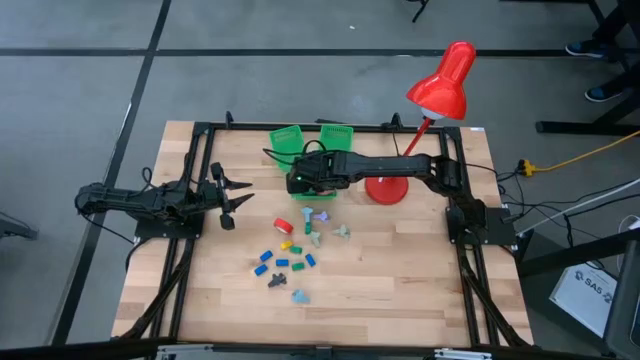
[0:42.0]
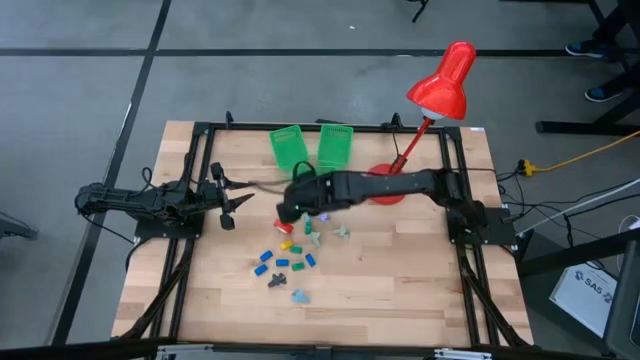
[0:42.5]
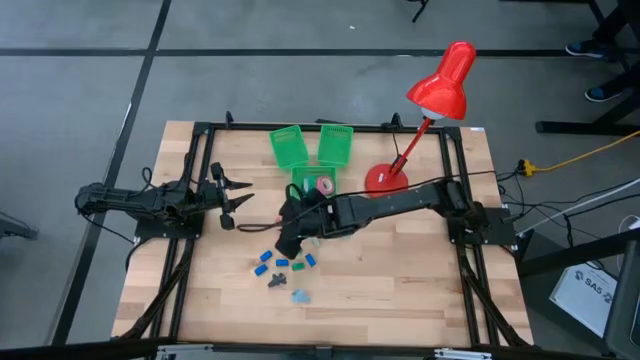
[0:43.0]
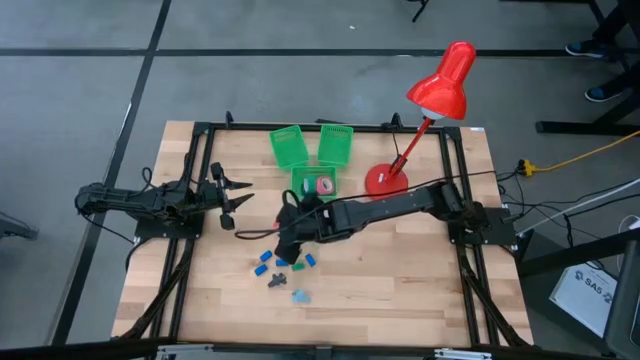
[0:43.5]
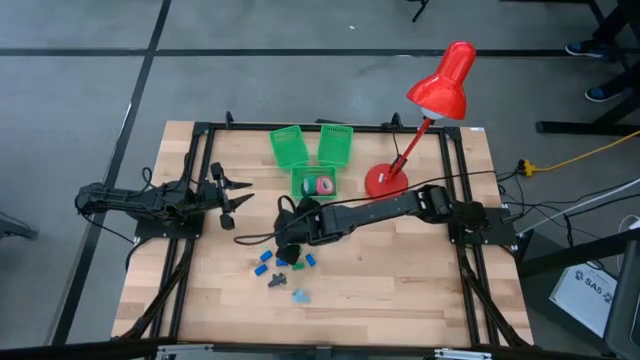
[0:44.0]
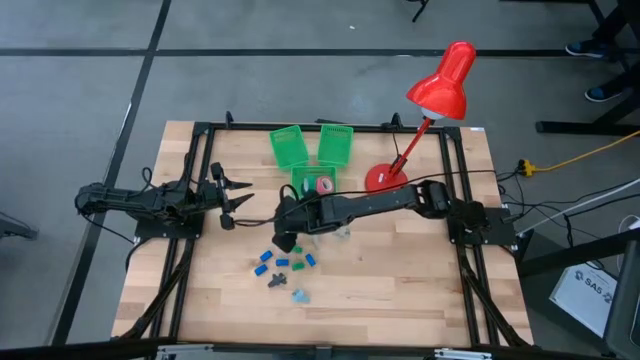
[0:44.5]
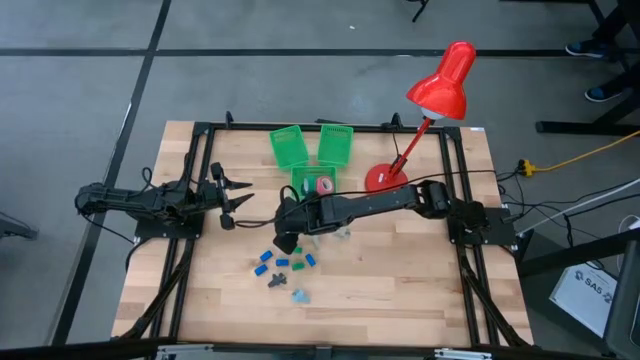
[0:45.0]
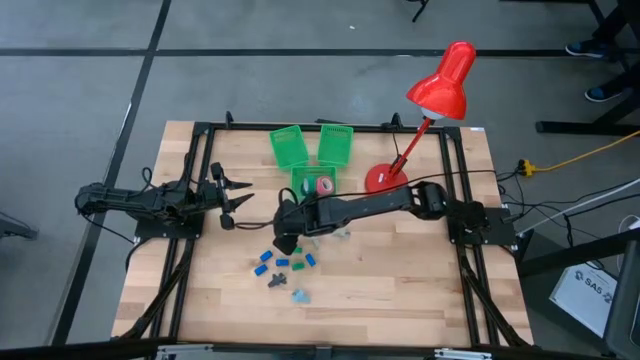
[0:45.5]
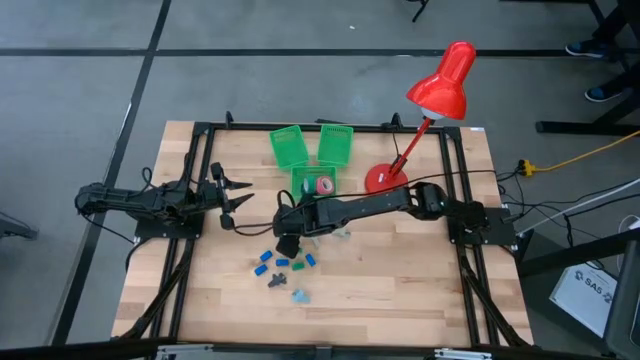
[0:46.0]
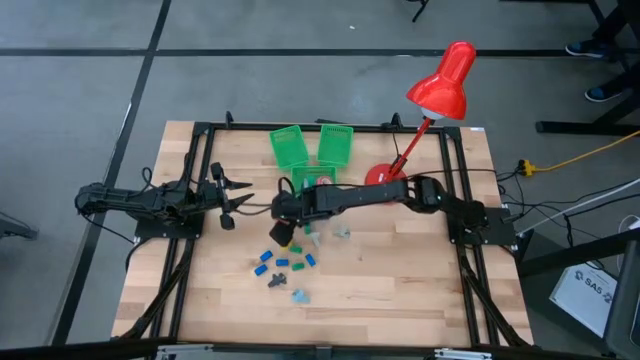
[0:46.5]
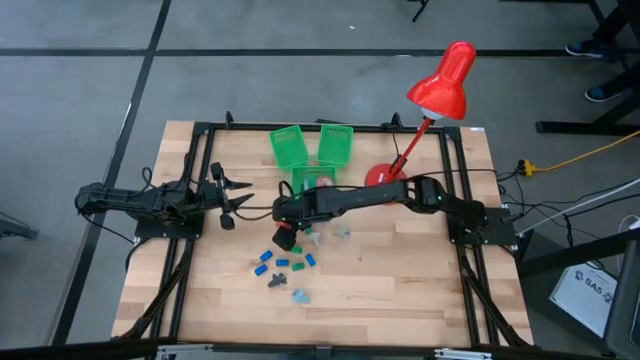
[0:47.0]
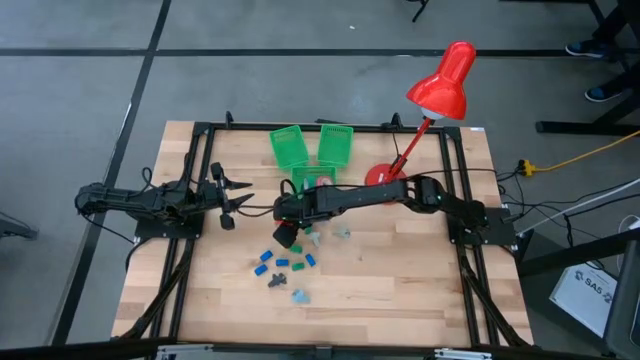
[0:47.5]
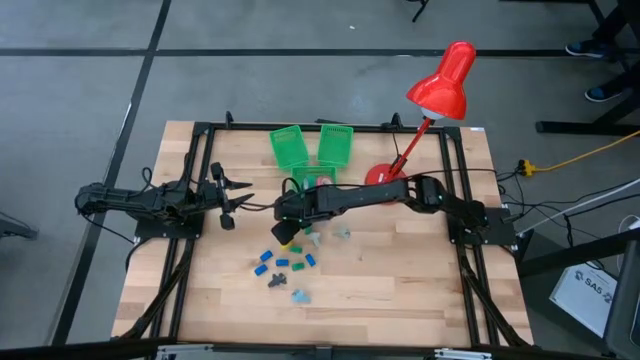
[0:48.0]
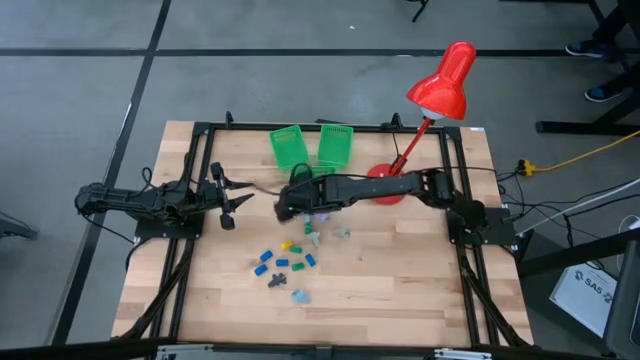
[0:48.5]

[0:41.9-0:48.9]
Task: Pick and place Stapler, Stapler remover, tape
Put the red tape into the middle green bin

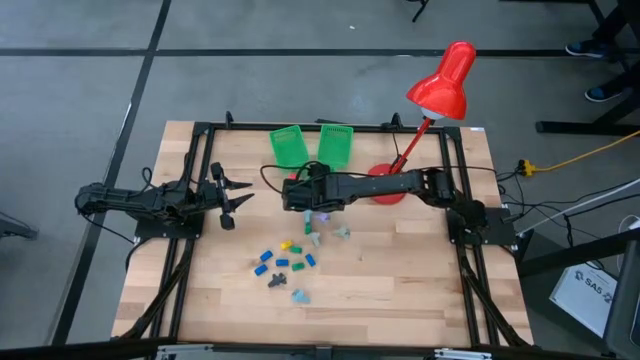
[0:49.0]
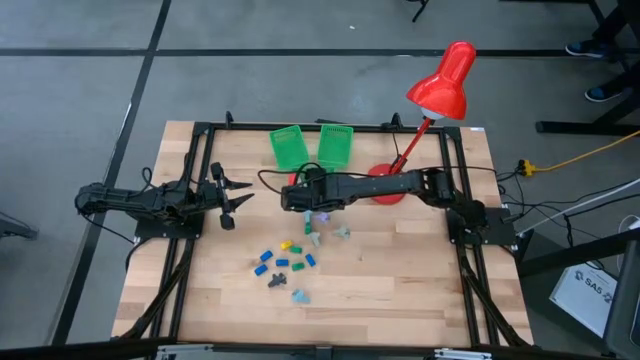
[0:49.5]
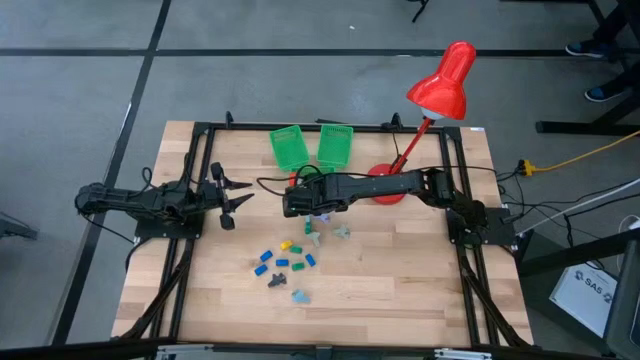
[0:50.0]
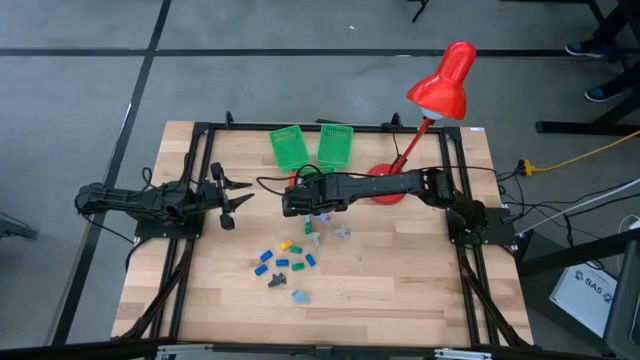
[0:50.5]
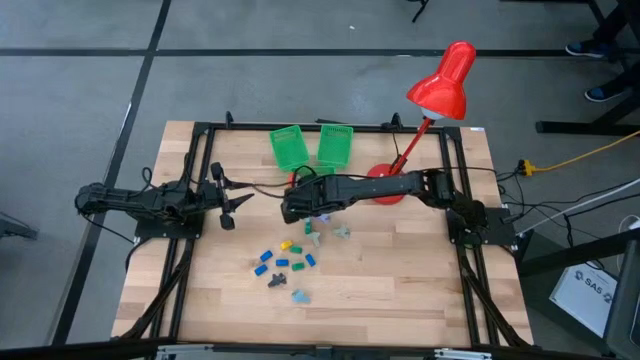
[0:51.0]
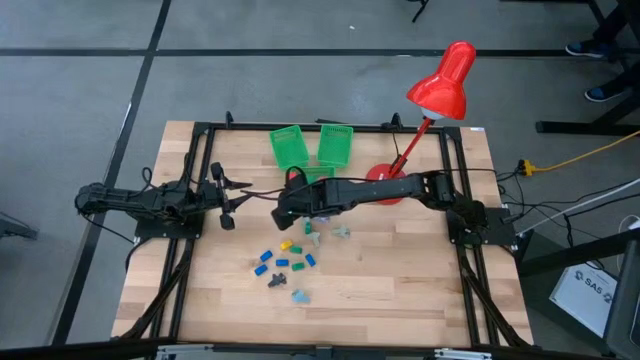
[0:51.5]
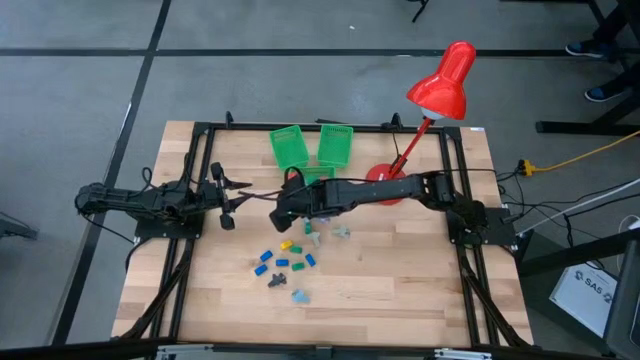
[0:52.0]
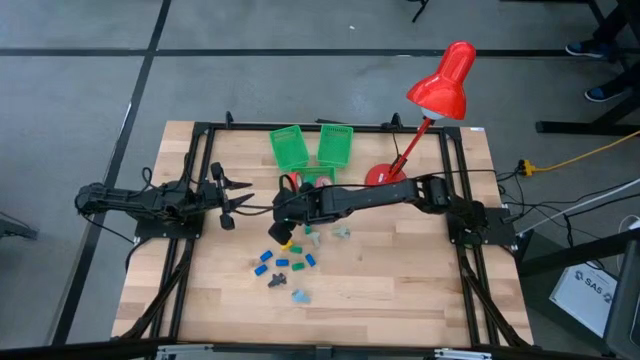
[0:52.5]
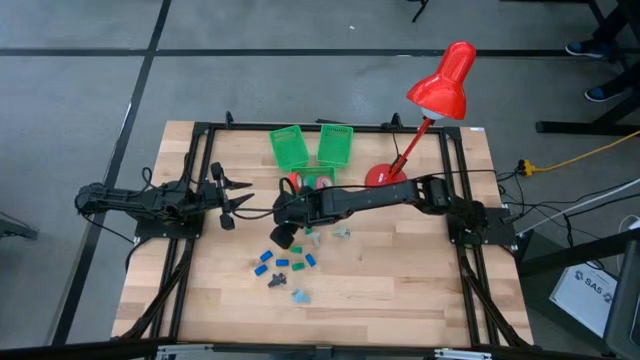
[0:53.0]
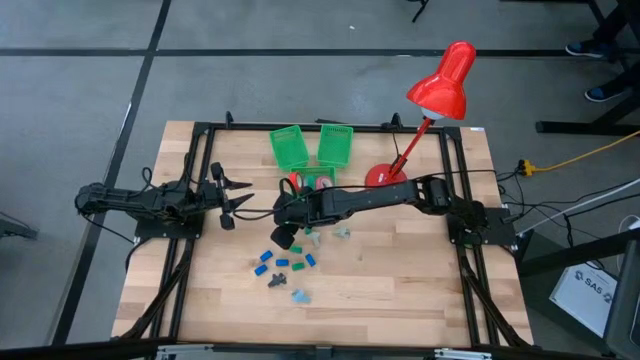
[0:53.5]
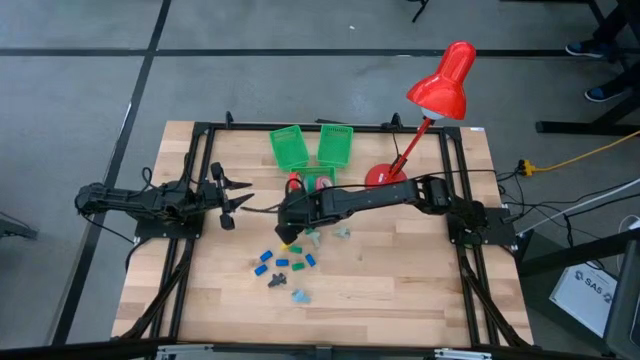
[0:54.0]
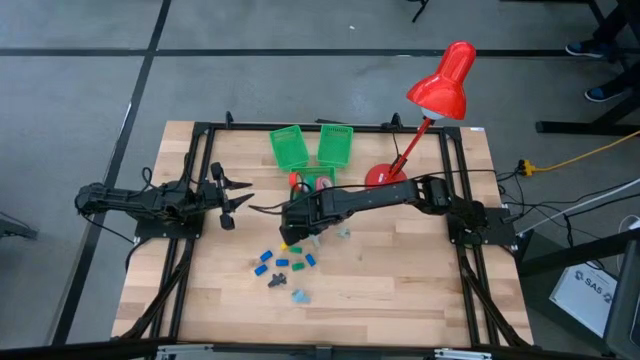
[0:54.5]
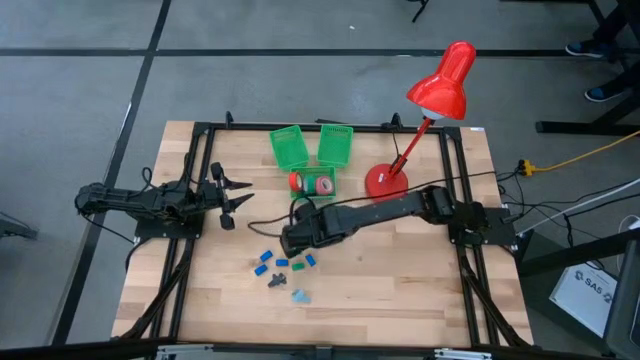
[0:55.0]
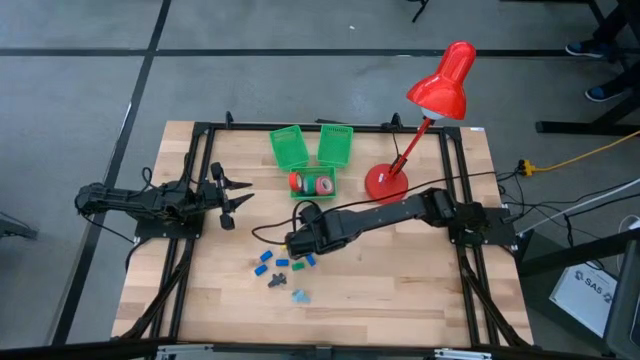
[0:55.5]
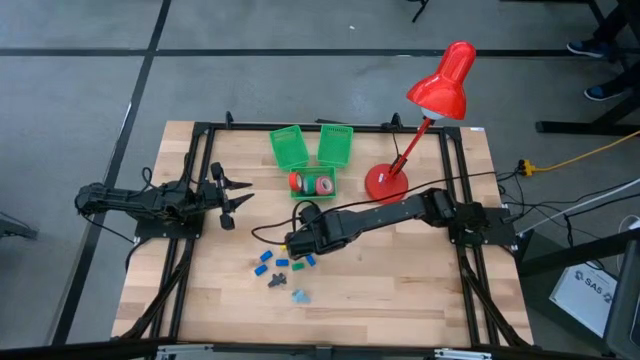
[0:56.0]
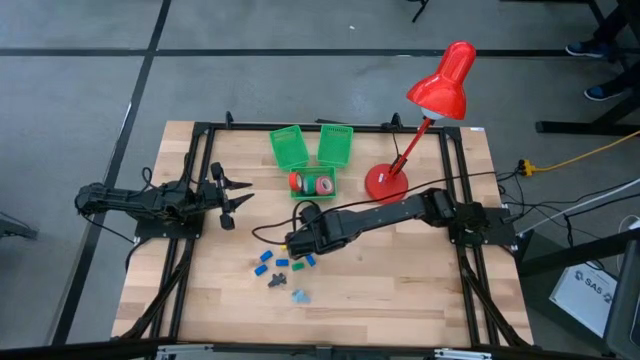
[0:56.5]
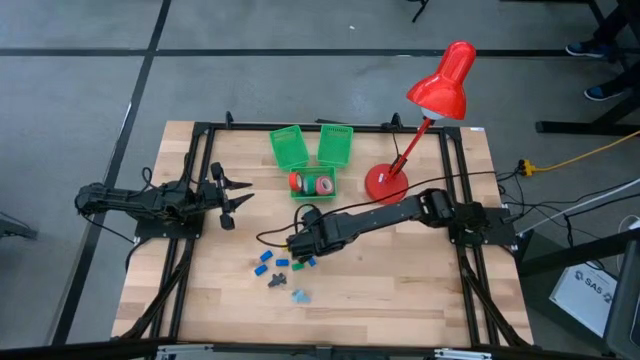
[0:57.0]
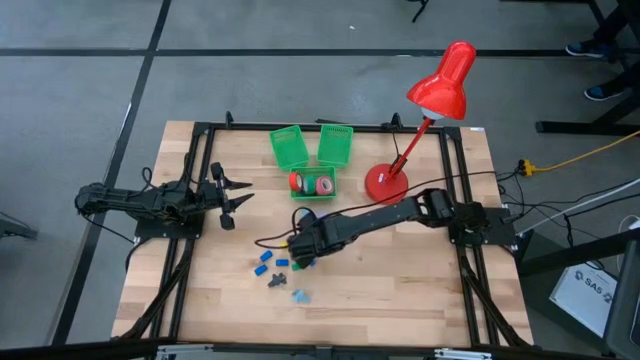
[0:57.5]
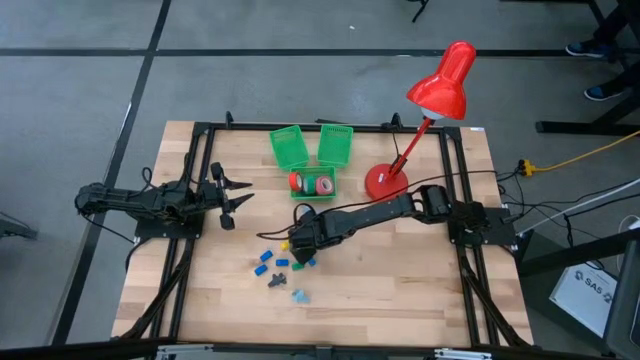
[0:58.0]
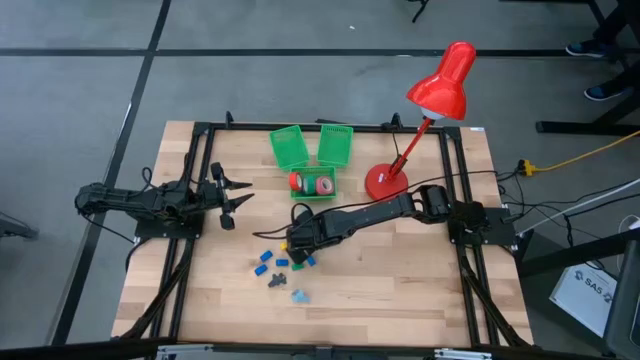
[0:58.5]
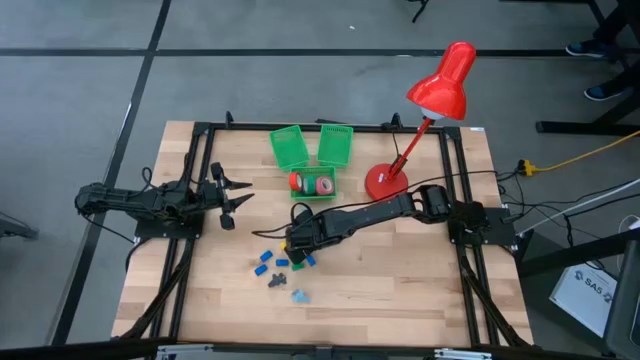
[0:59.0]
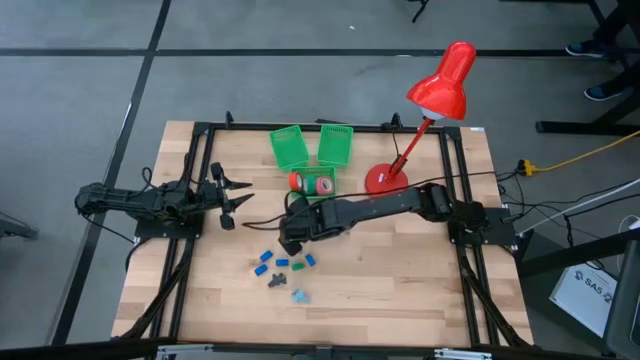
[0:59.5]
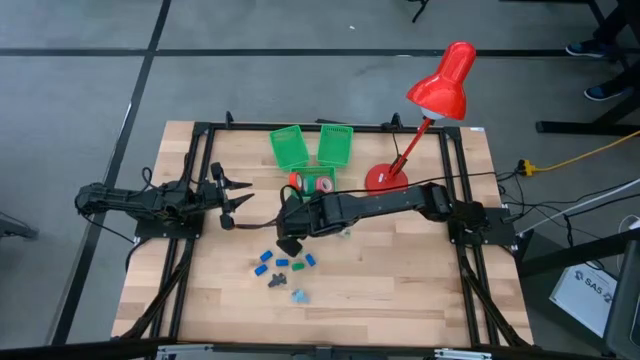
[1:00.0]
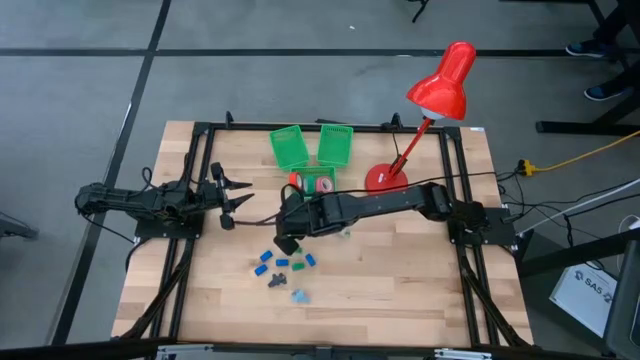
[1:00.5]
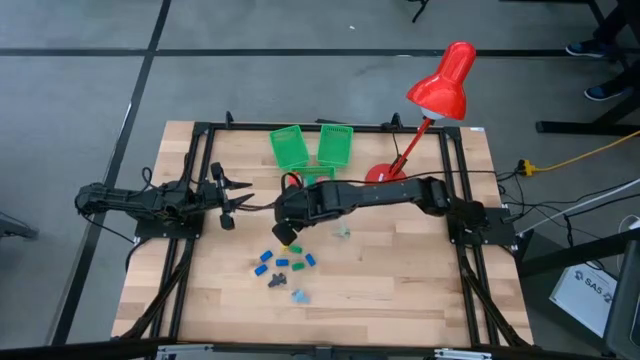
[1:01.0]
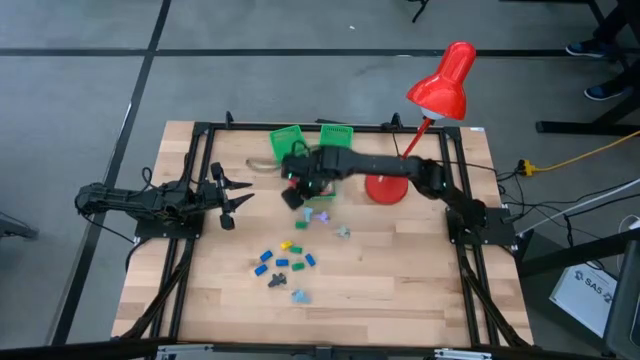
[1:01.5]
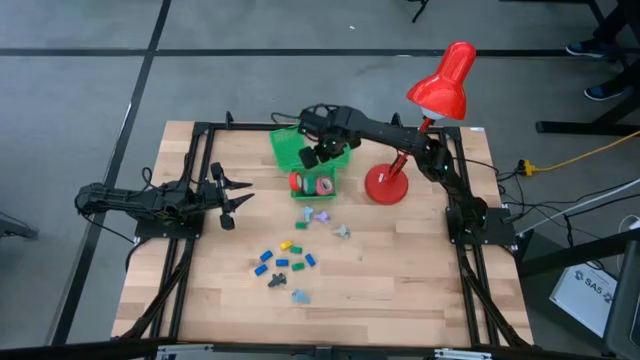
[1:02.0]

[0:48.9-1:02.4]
Put the gray staple remover into the right green bin
